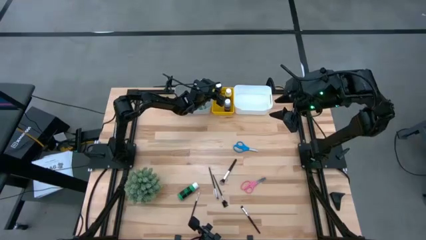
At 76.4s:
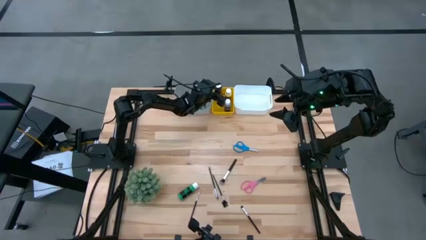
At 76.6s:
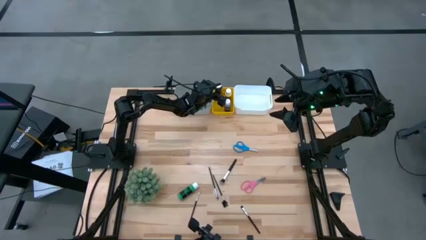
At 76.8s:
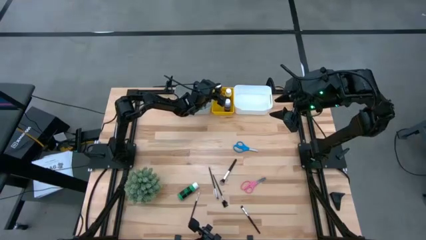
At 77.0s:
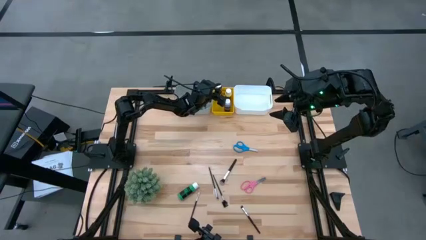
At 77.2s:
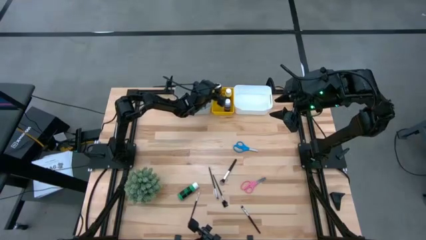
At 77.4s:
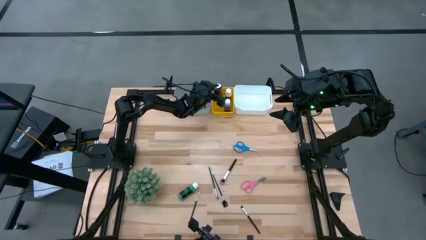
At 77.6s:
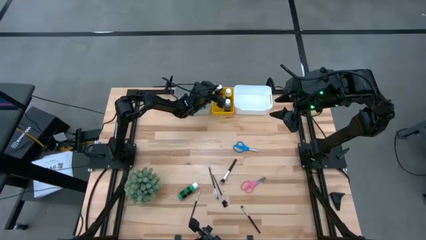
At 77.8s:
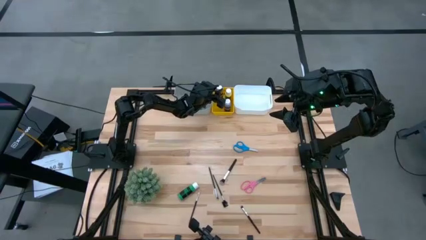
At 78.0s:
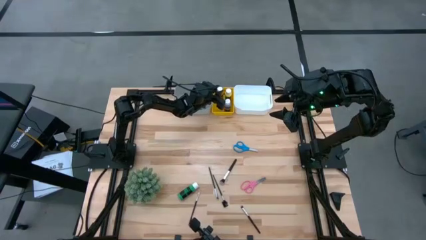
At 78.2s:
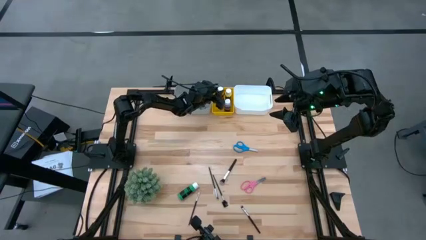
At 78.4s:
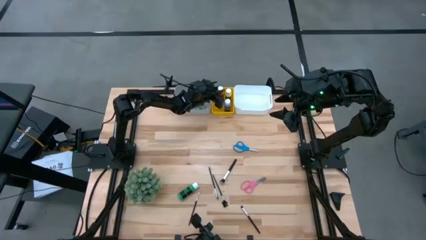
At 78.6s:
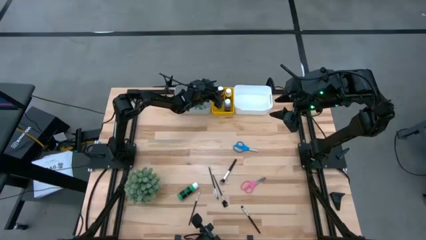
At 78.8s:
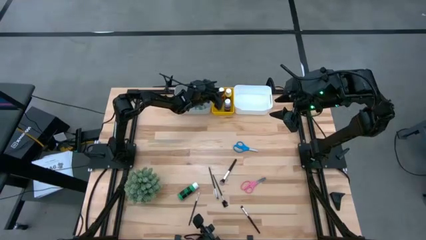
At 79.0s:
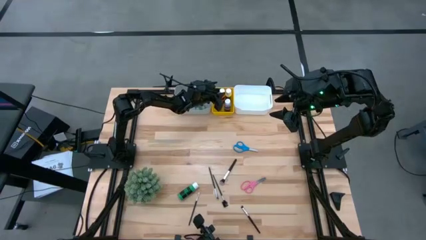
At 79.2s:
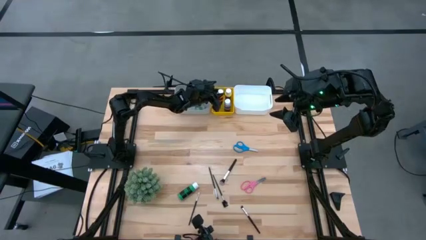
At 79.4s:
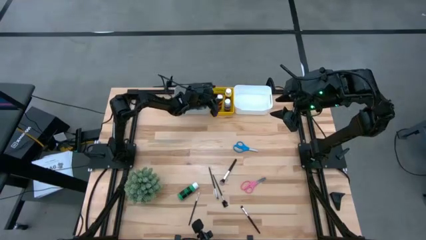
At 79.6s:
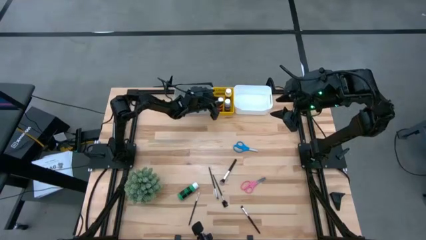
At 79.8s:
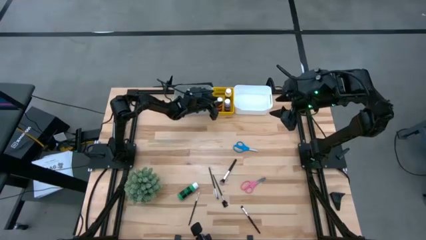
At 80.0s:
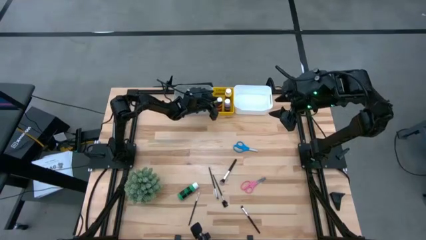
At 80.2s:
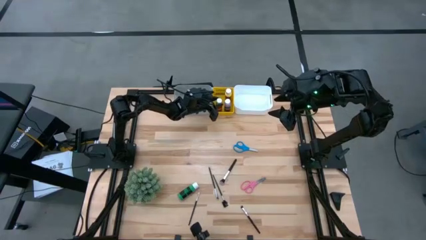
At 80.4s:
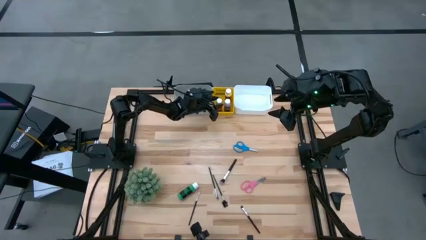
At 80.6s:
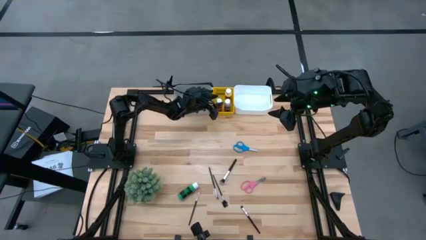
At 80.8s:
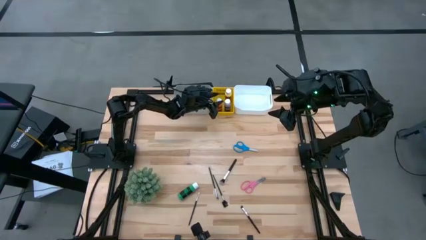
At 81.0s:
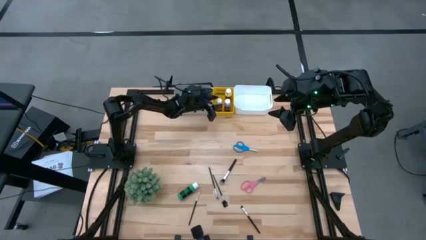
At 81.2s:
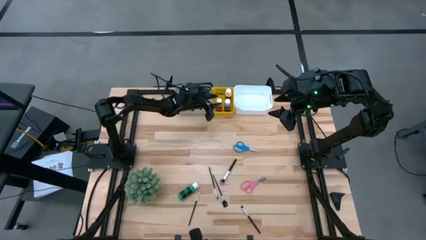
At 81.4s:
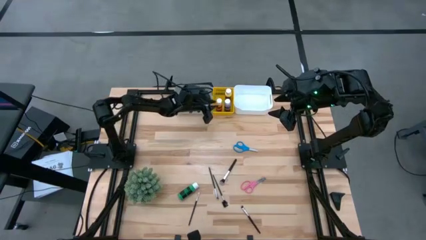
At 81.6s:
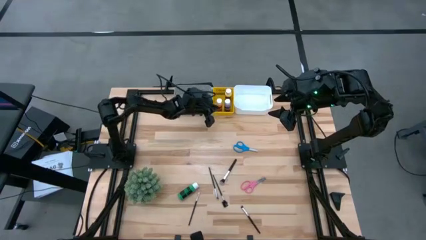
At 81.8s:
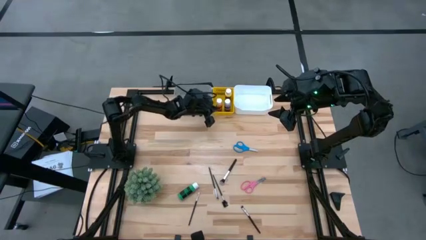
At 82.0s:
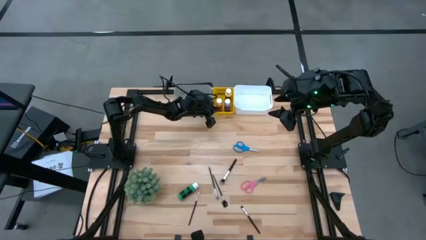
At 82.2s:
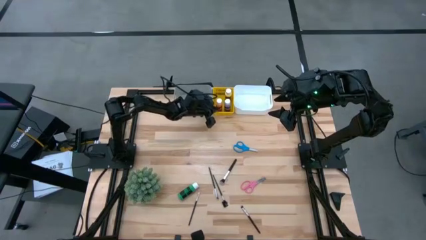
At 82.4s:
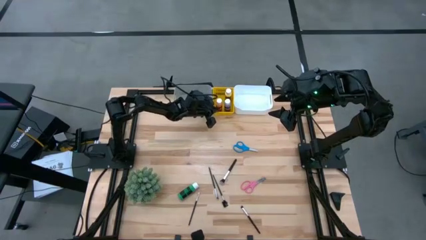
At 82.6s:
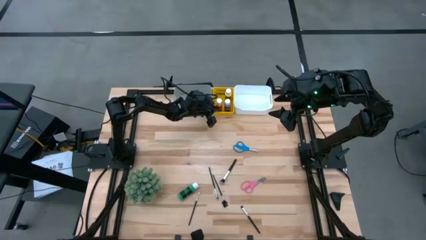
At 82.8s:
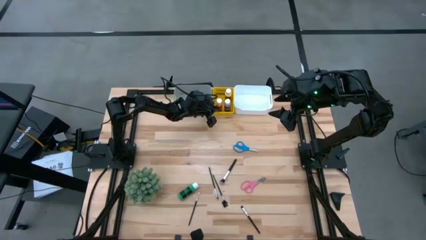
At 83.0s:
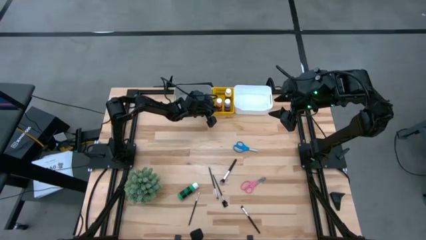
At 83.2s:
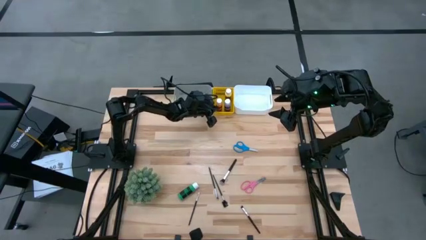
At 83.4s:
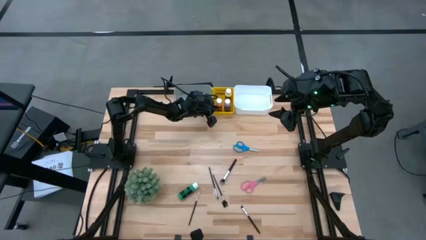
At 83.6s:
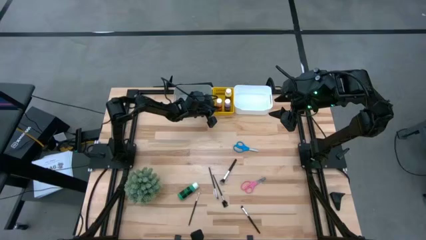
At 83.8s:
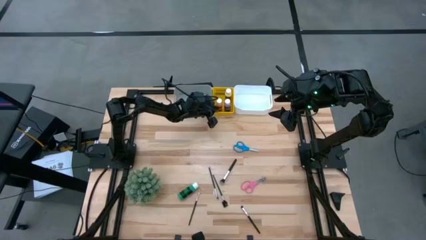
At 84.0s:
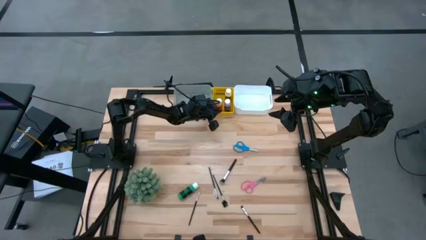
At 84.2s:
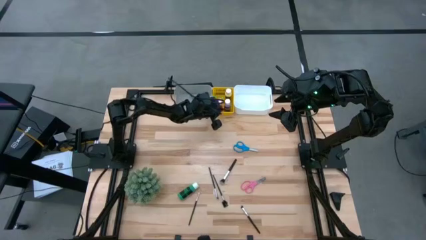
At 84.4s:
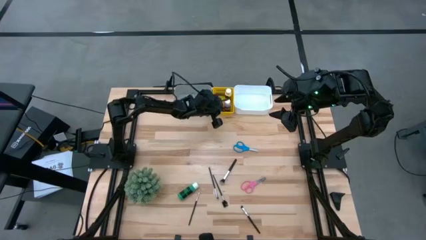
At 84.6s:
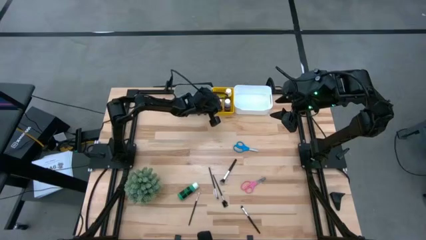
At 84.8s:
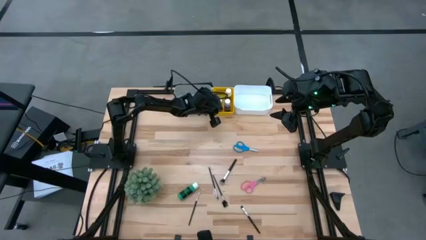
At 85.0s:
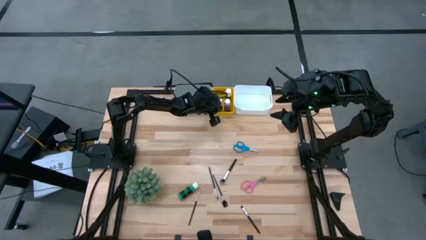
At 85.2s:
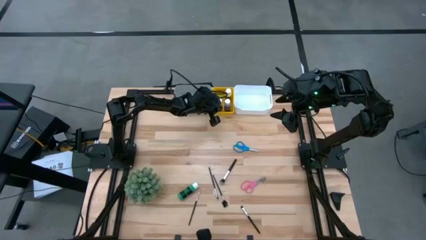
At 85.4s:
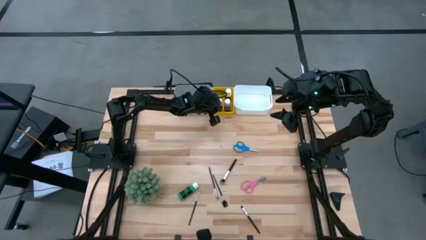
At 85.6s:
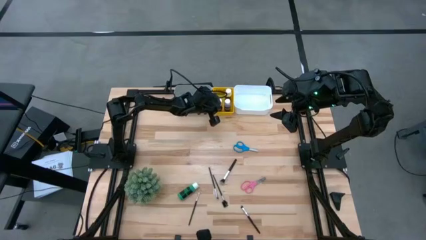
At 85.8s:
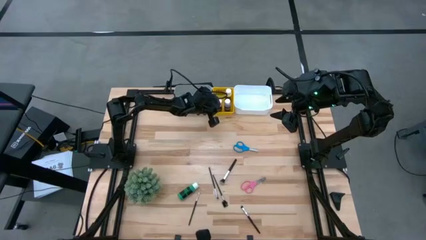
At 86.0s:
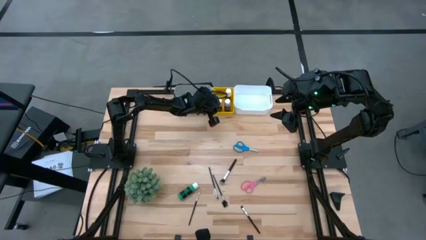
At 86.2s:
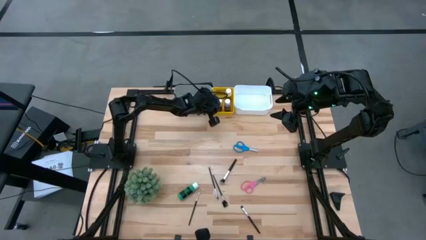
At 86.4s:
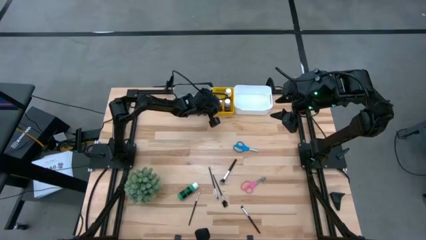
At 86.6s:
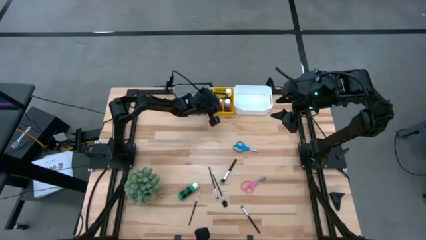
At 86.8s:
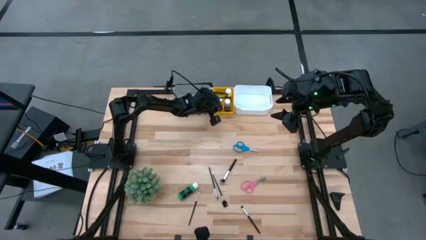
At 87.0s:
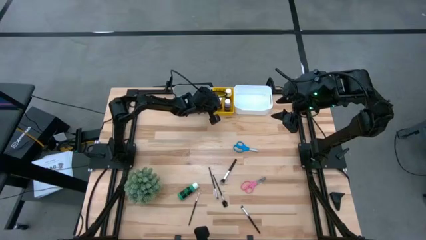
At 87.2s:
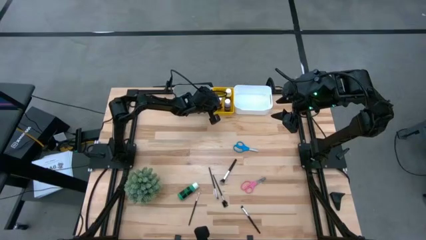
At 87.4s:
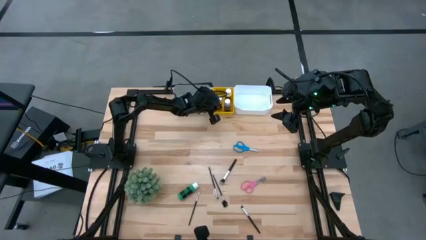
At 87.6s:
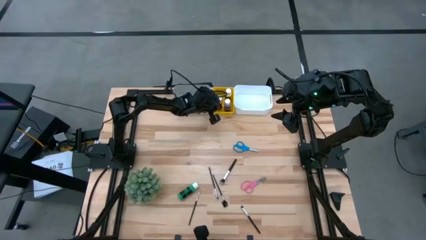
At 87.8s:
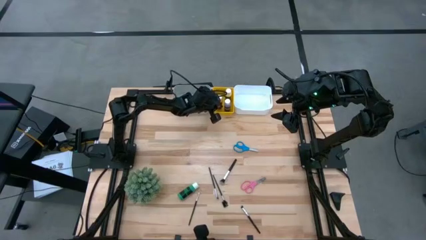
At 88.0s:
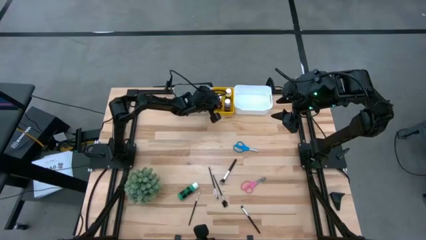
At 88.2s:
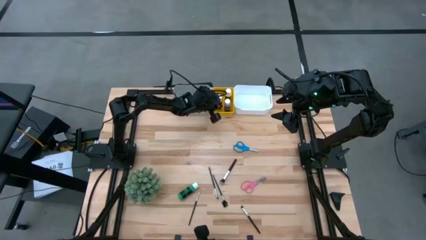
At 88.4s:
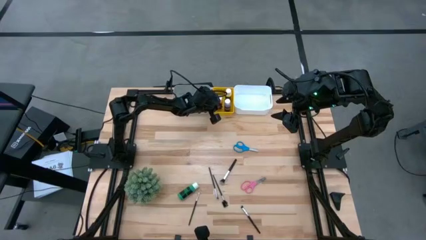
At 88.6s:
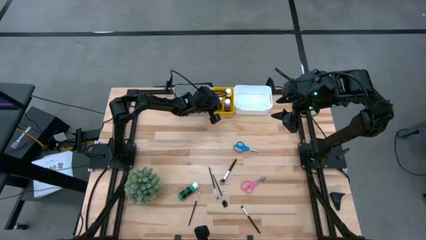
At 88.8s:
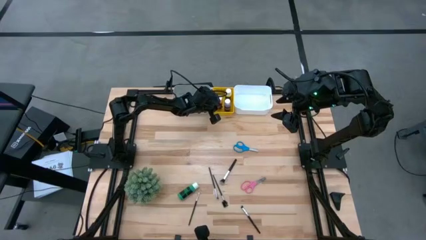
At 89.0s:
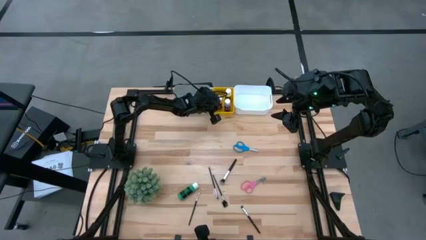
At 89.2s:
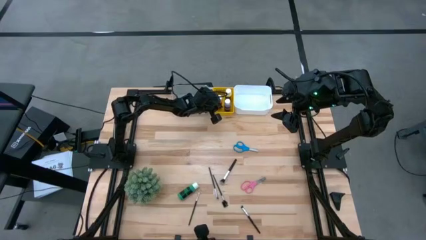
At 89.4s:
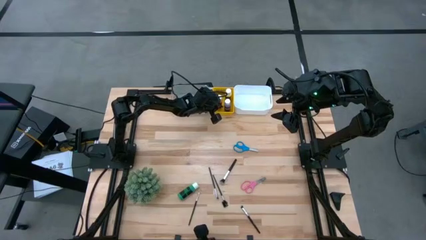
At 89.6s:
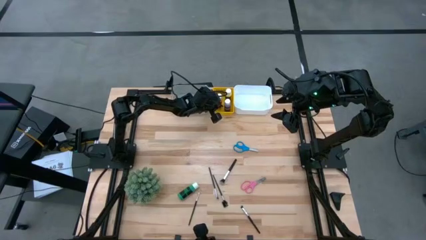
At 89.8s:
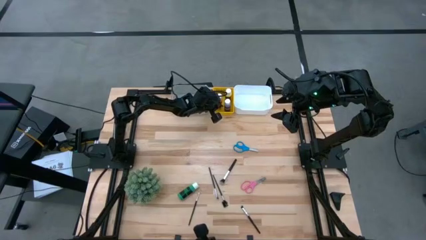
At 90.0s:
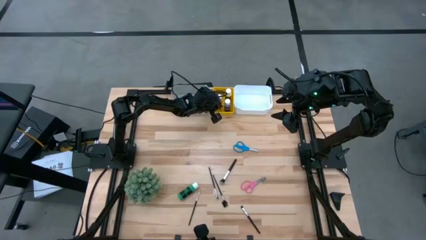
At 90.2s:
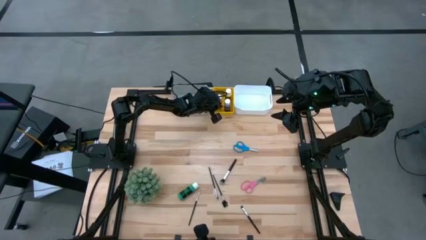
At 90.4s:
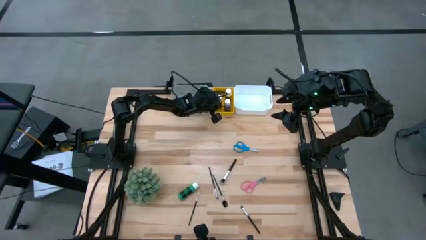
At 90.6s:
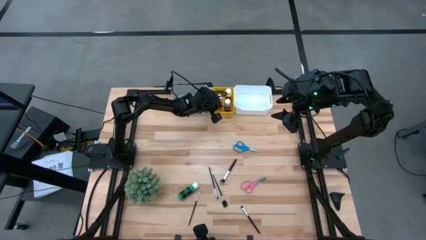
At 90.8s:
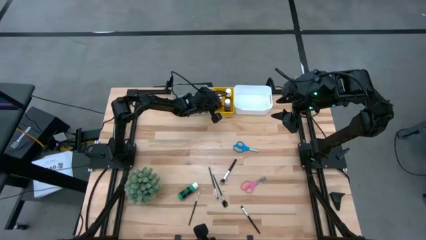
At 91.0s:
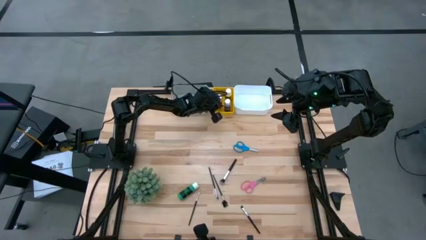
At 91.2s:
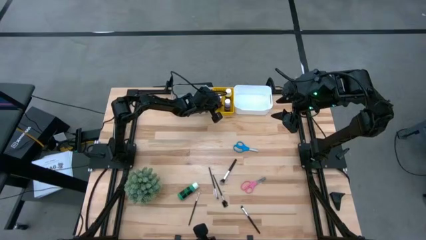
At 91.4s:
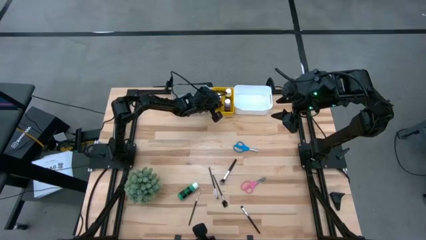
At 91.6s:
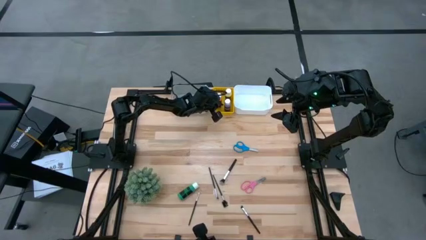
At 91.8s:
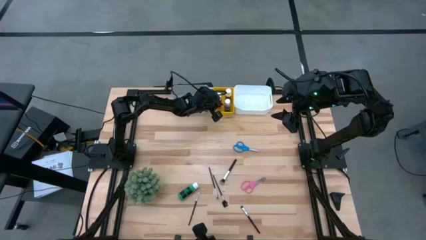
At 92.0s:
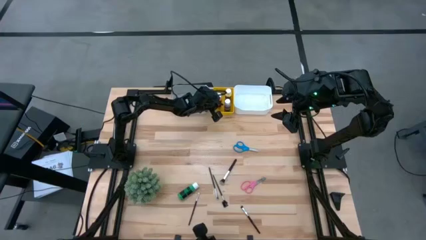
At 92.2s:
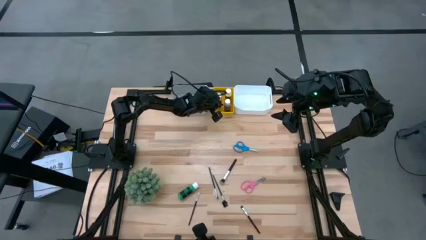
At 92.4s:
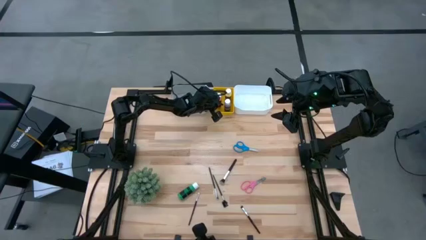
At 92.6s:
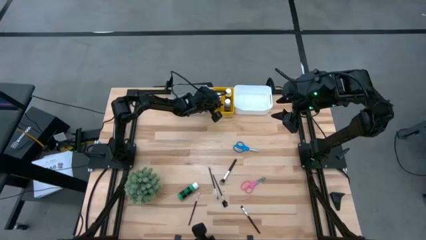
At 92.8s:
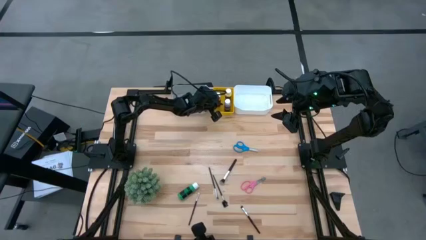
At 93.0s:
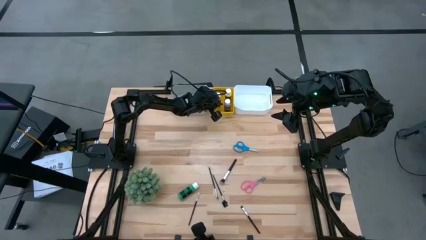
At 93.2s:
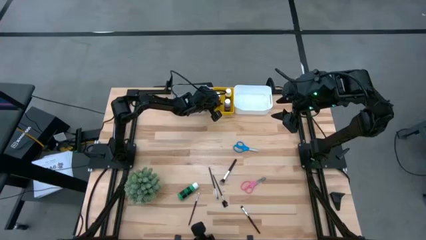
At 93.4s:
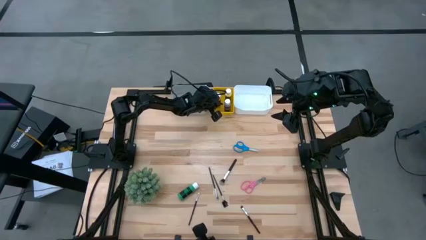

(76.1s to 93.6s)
Task: Pick & Place Paint Supplies
Put the orange paint bottle into the yellow bin
